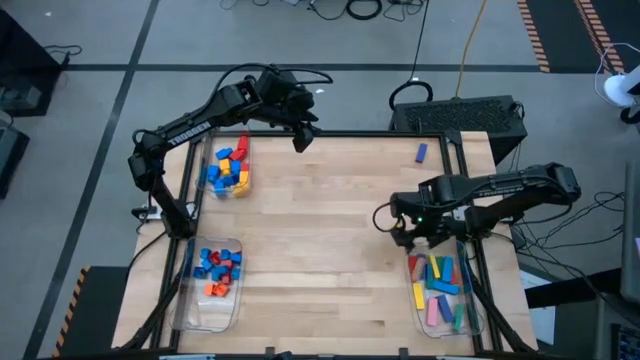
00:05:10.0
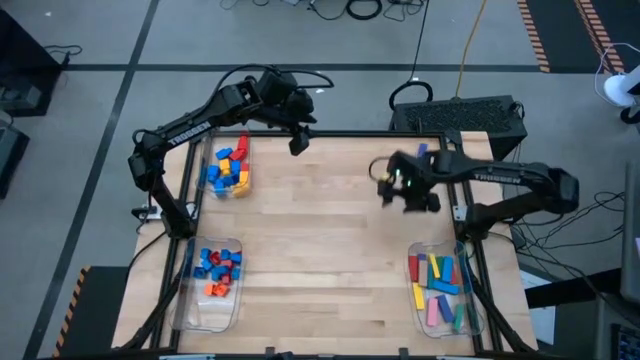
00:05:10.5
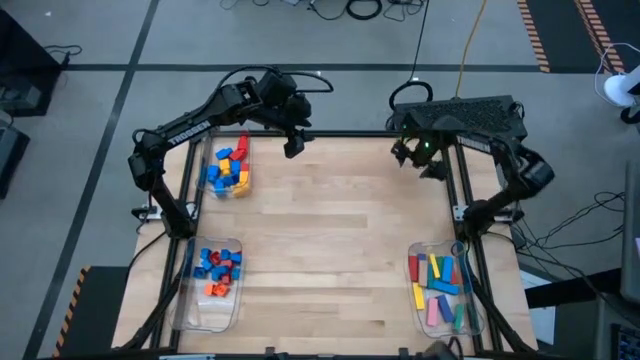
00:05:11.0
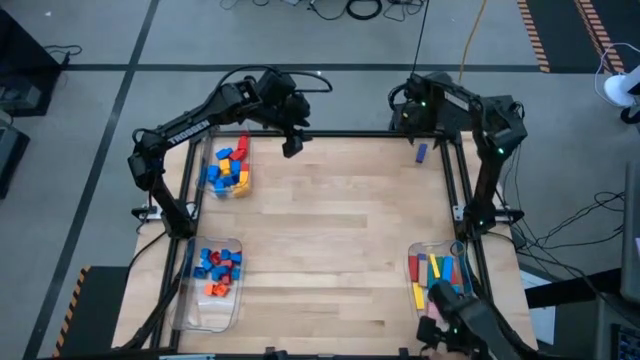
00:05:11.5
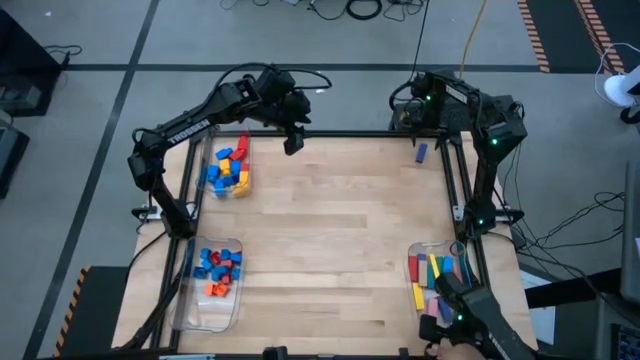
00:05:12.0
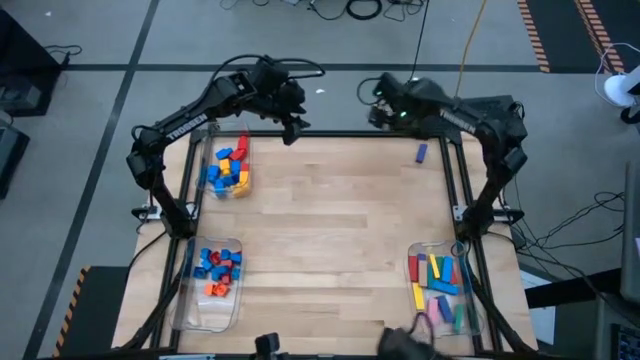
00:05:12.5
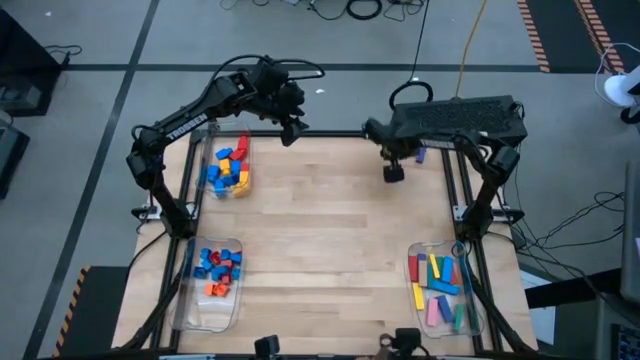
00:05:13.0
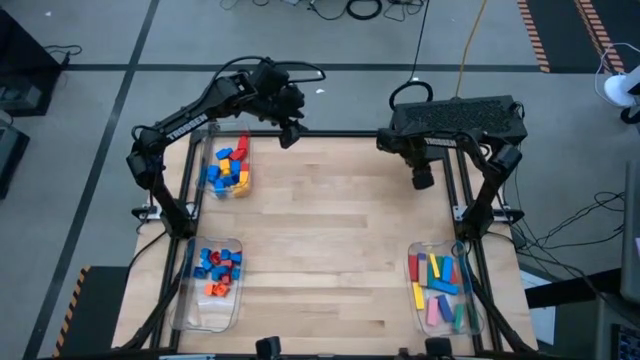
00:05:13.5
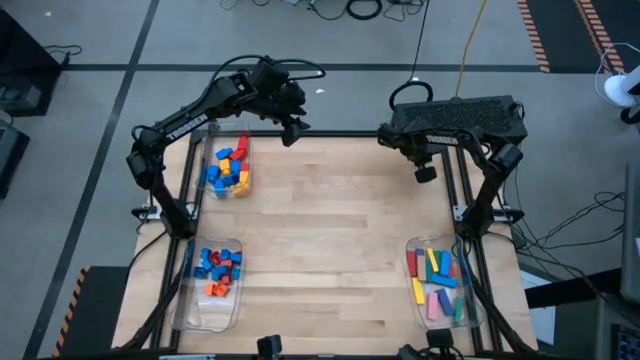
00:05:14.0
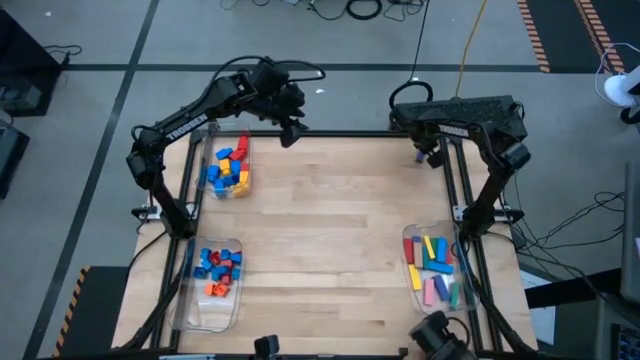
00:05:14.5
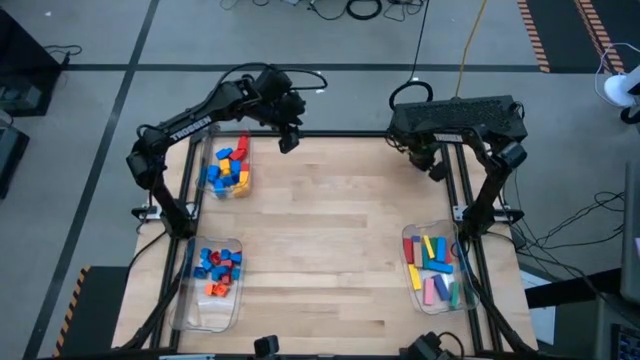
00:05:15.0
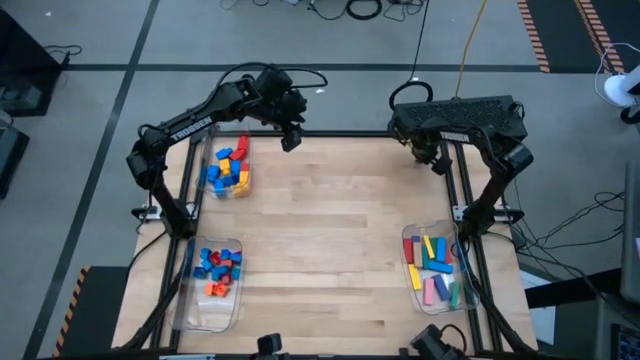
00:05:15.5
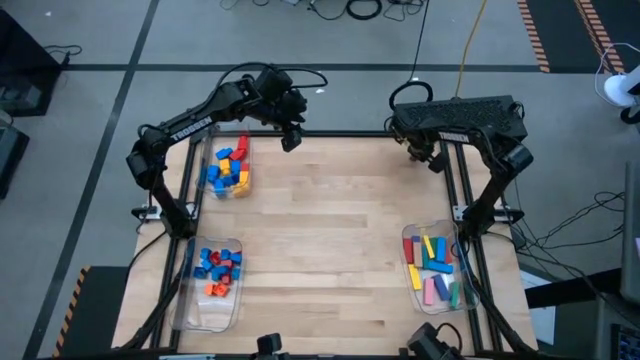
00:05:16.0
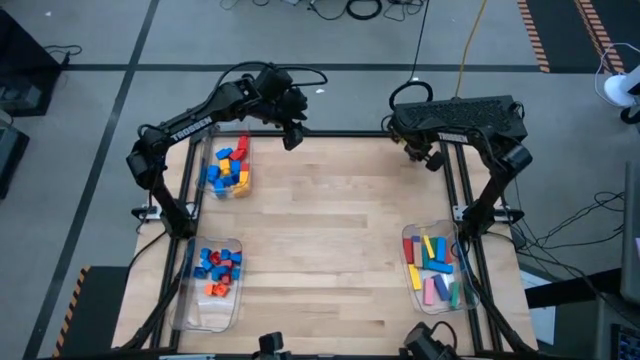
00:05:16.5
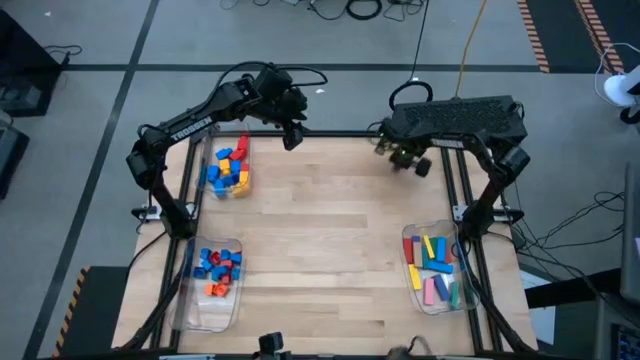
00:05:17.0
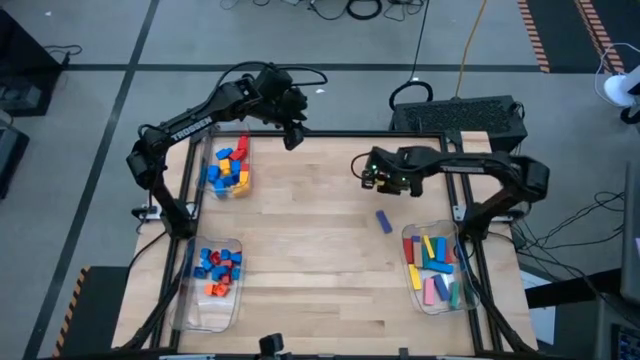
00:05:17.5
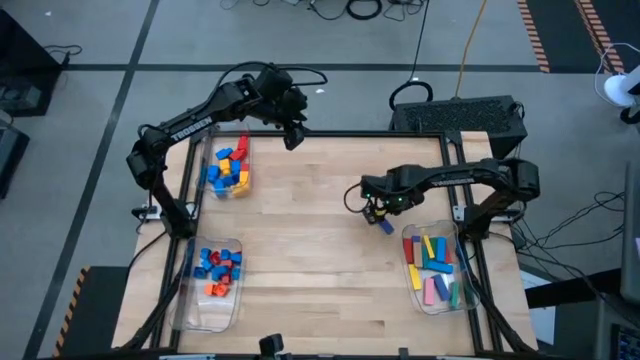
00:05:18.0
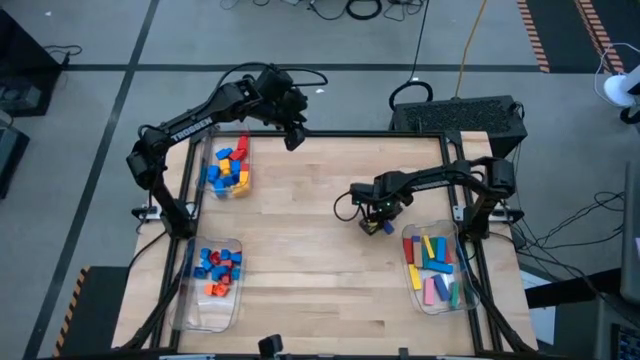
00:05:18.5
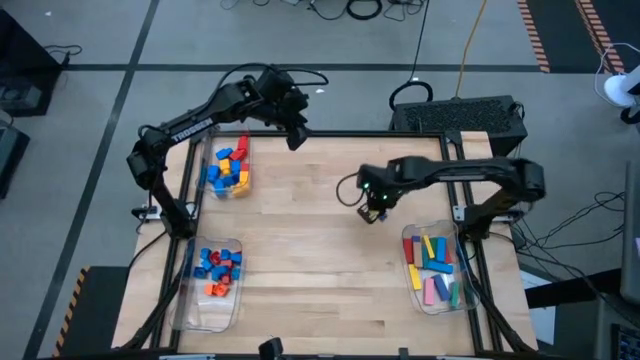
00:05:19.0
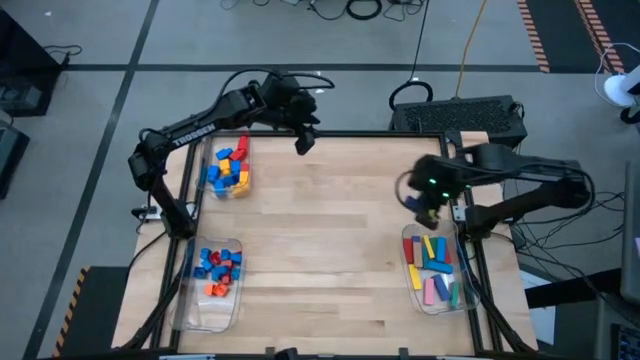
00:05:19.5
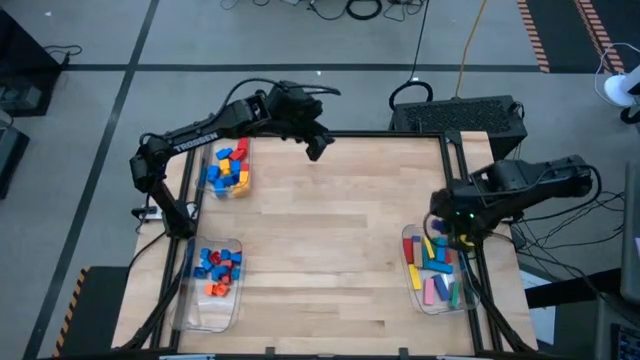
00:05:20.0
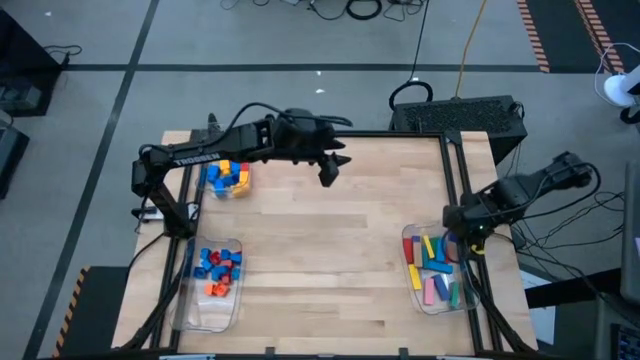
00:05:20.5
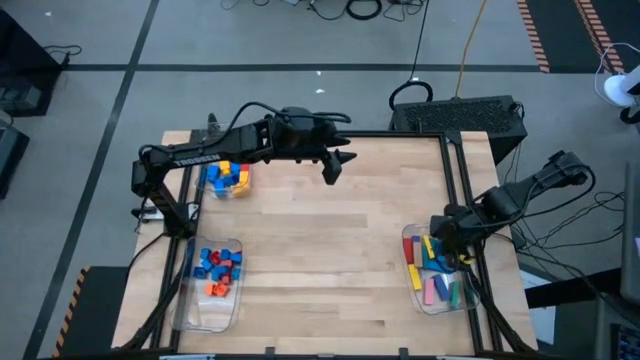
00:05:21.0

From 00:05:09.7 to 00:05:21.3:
Task: Sort blocks by size
Put the blue rectangular block into the bottom right transparent bin

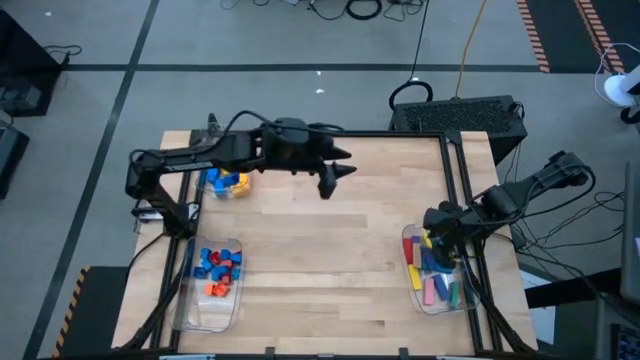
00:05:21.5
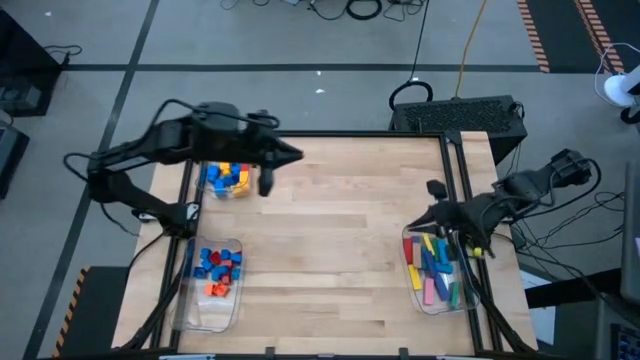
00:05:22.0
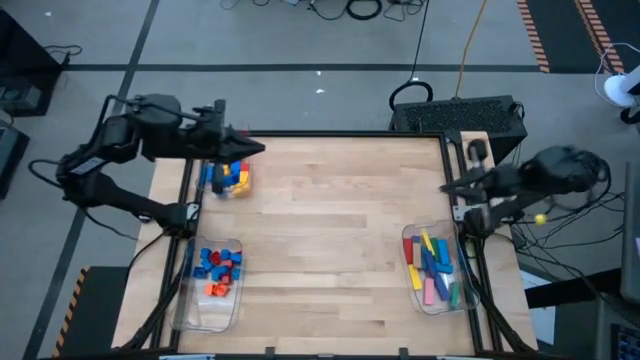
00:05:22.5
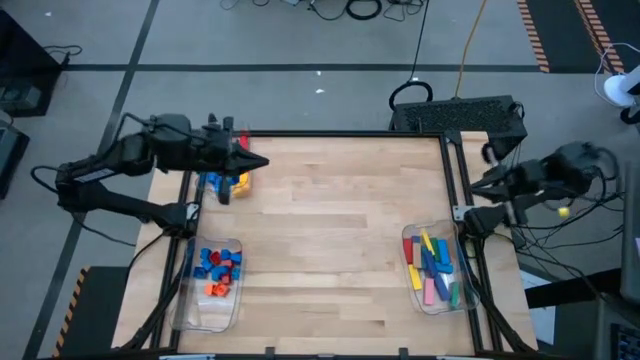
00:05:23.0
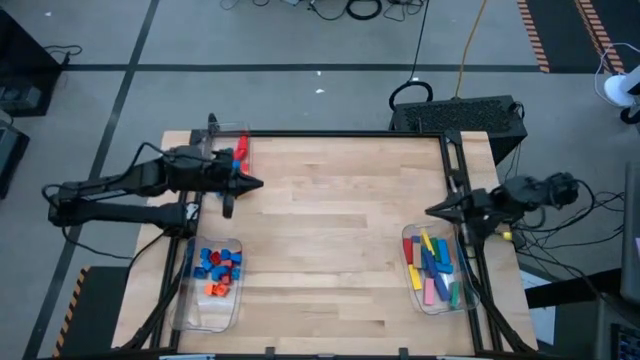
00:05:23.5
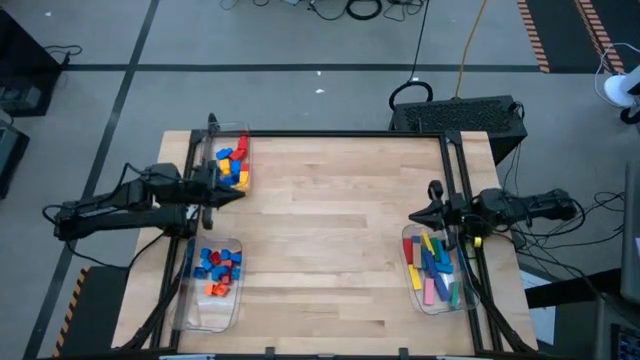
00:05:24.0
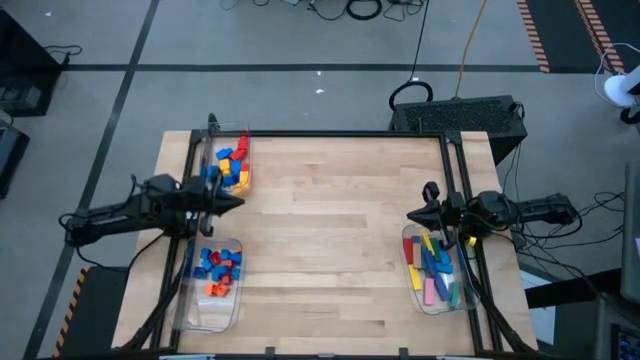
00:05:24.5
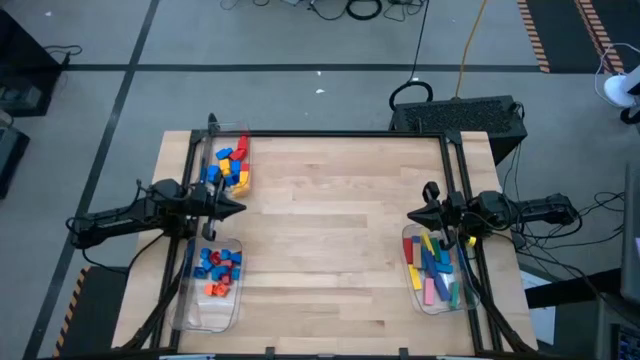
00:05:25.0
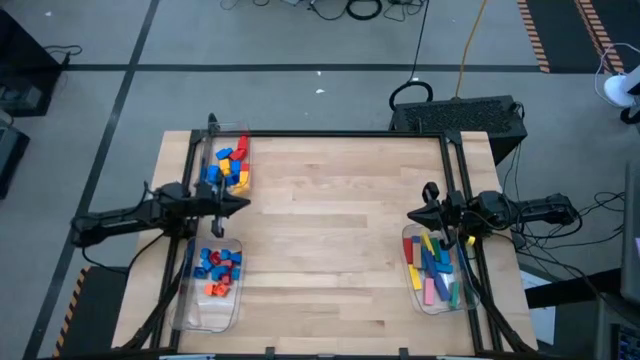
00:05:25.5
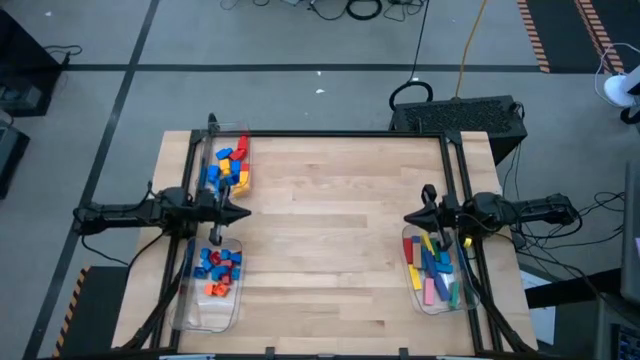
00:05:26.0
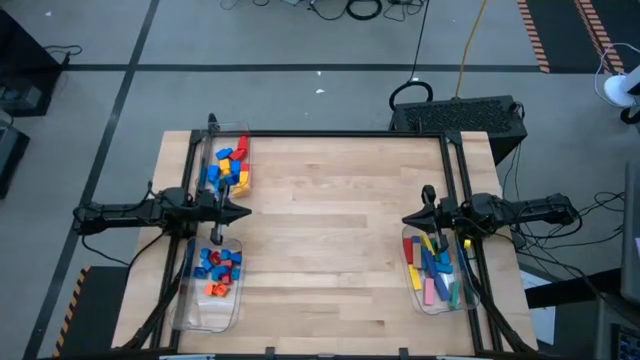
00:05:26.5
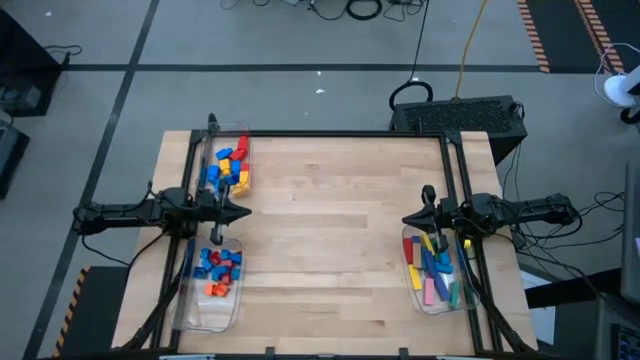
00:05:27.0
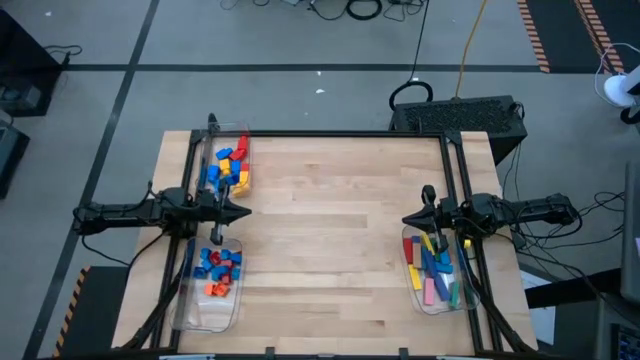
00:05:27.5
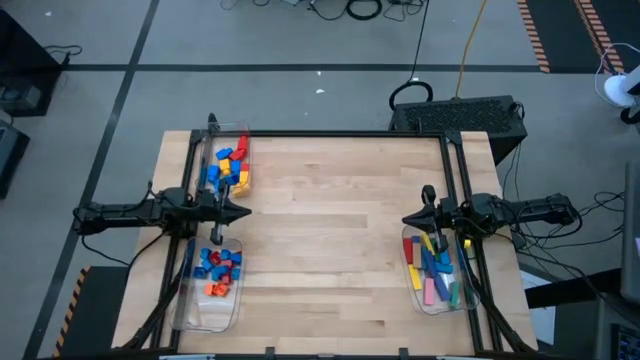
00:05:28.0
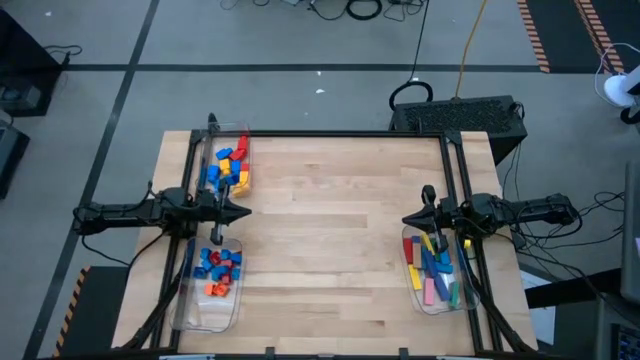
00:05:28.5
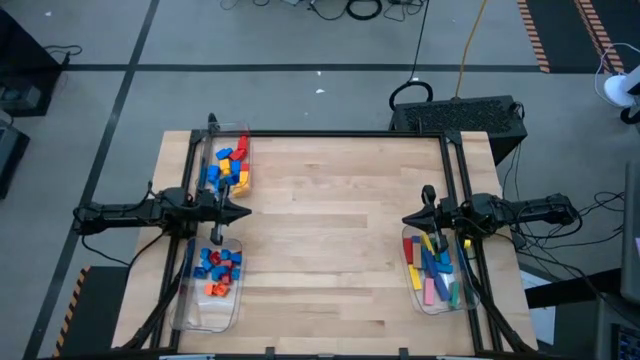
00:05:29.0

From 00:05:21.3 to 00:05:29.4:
Return to Home Position

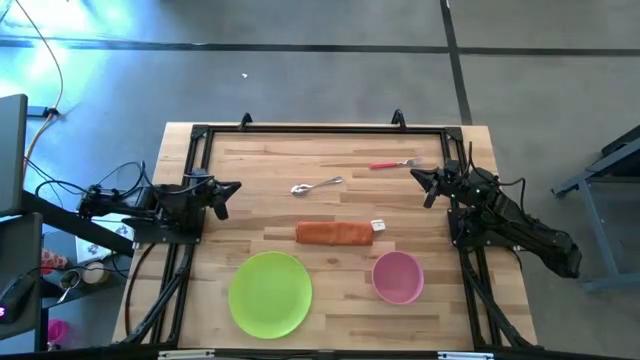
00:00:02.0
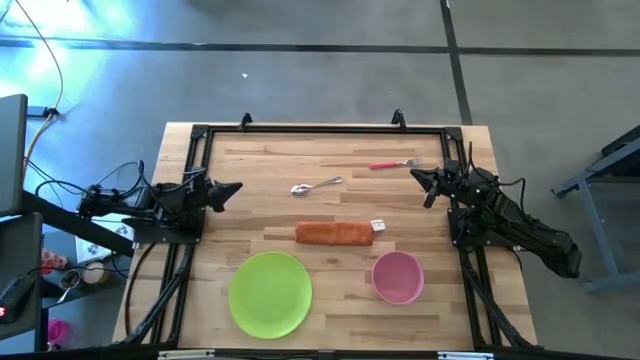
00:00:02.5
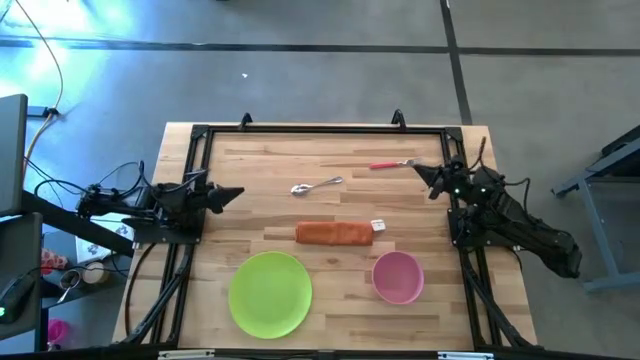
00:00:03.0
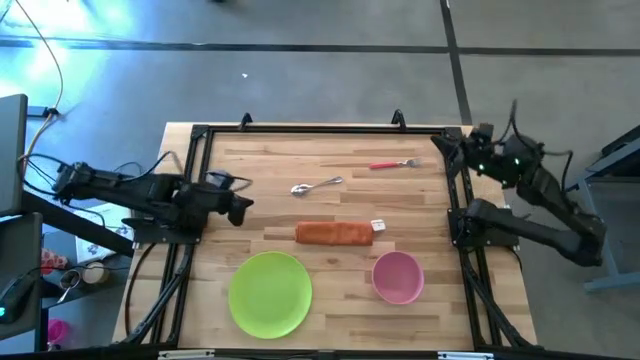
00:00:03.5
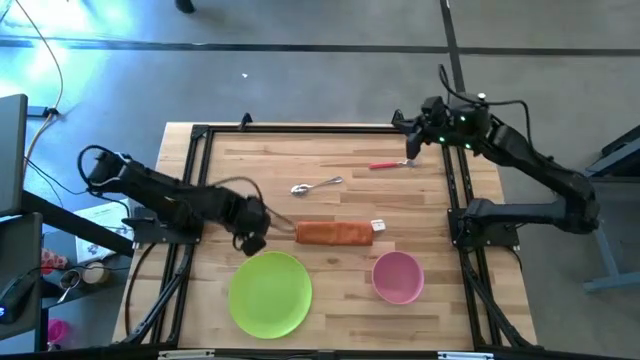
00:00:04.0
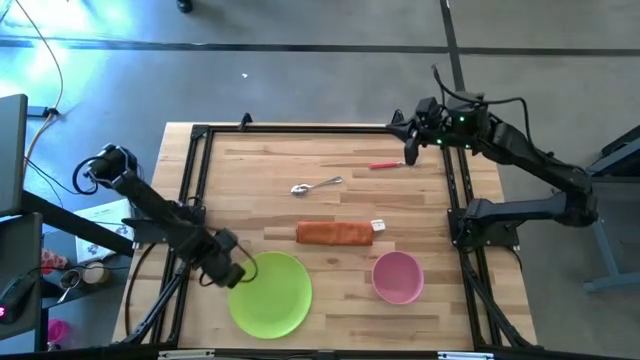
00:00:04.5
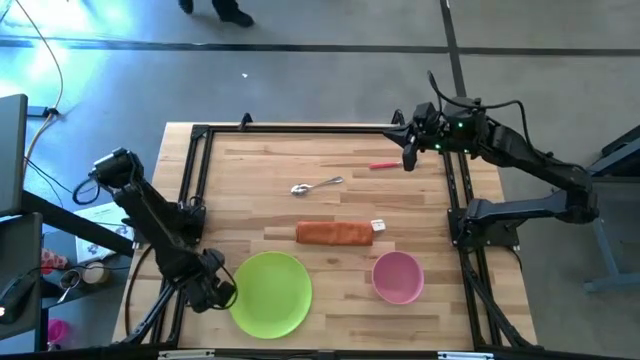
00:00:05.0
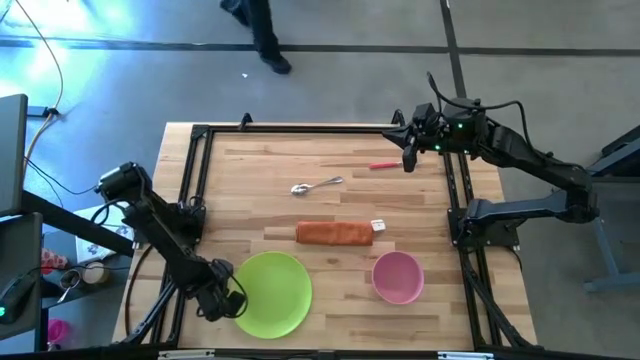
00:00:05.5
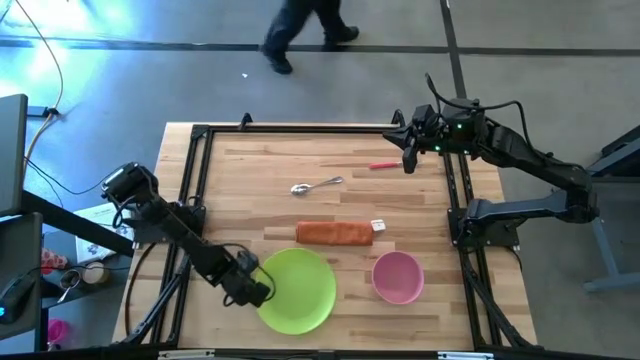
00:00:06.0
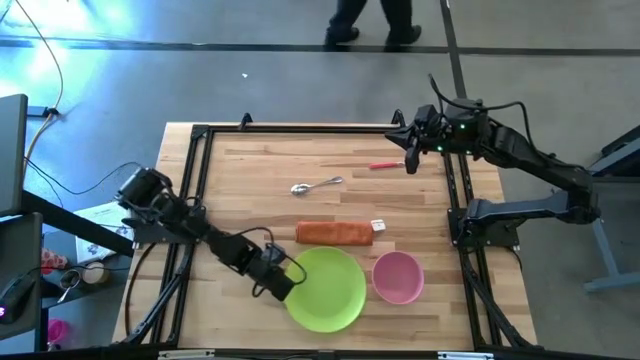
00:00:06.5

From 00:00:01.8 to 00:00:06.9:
Task: Set table place
Move the green plate to the left of the pink bowl
